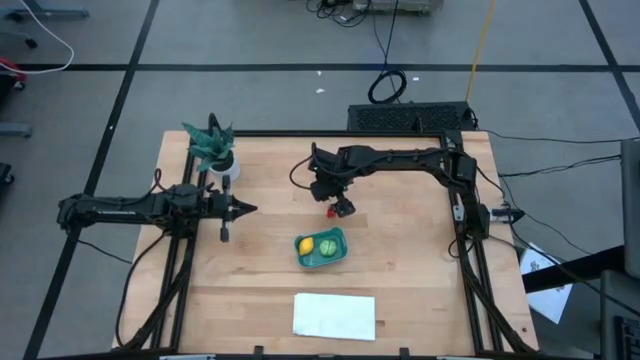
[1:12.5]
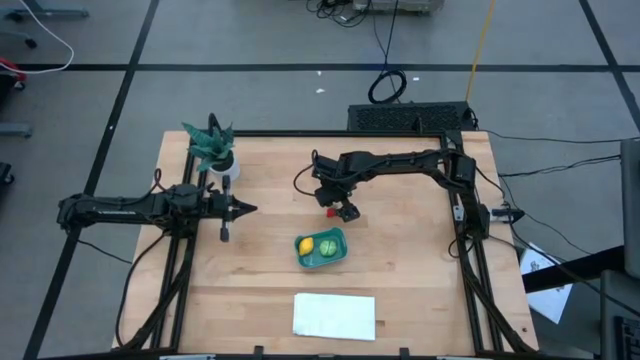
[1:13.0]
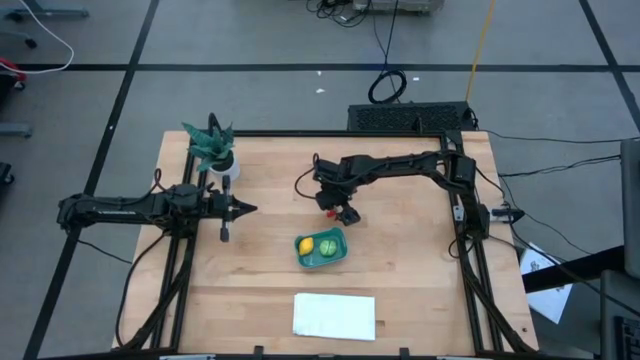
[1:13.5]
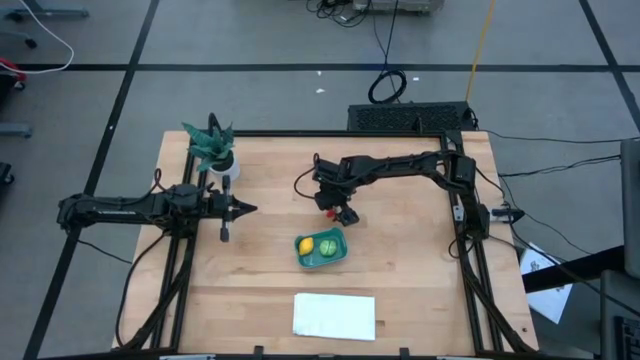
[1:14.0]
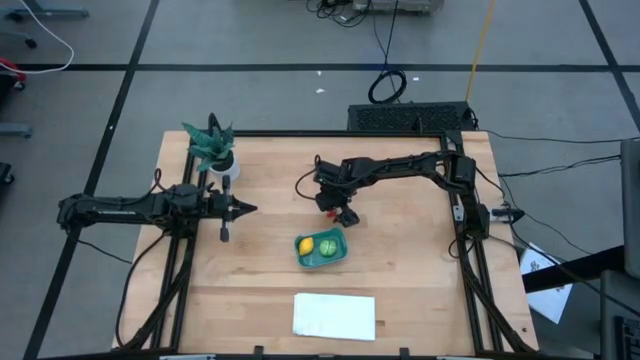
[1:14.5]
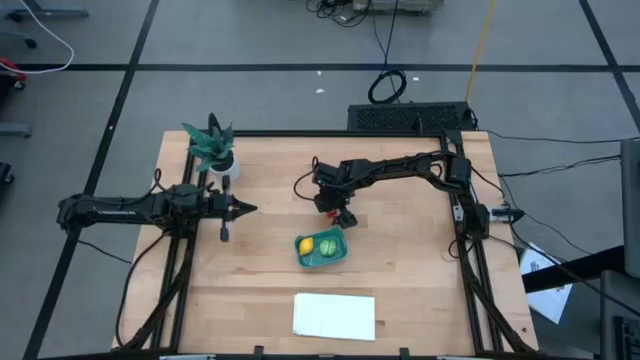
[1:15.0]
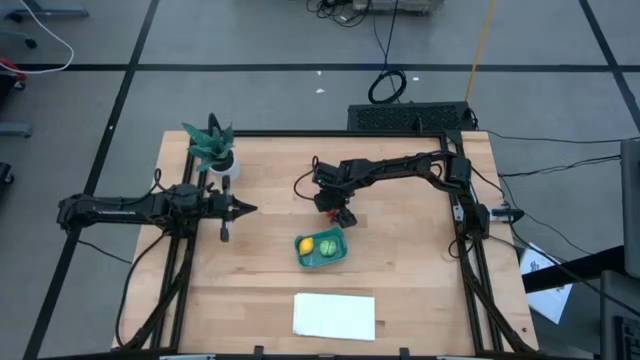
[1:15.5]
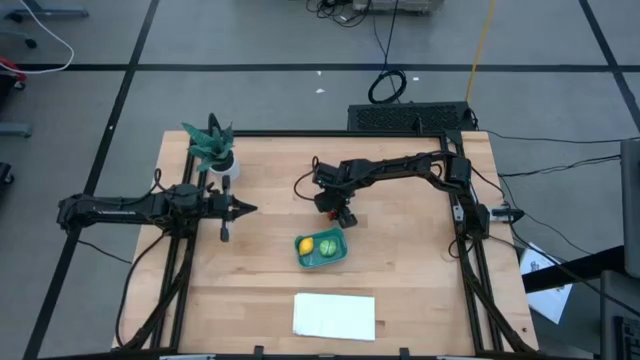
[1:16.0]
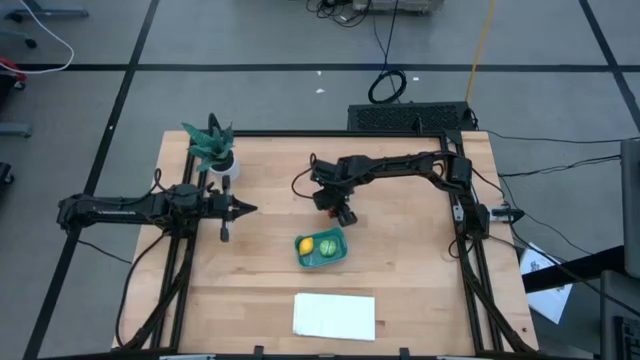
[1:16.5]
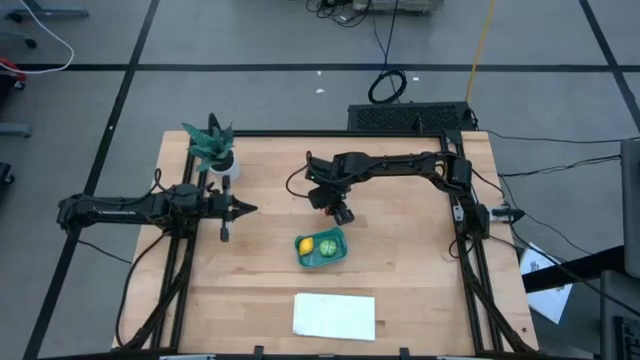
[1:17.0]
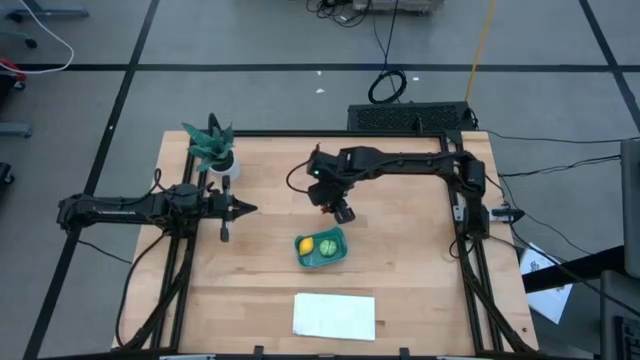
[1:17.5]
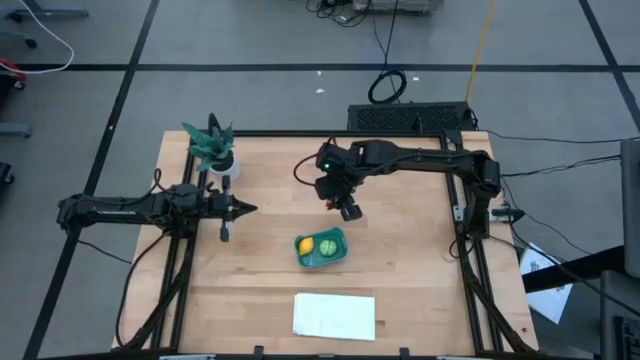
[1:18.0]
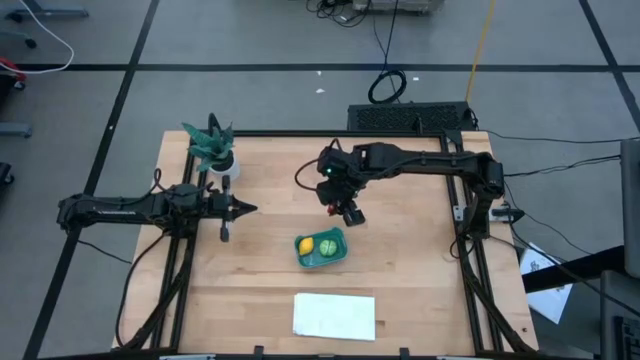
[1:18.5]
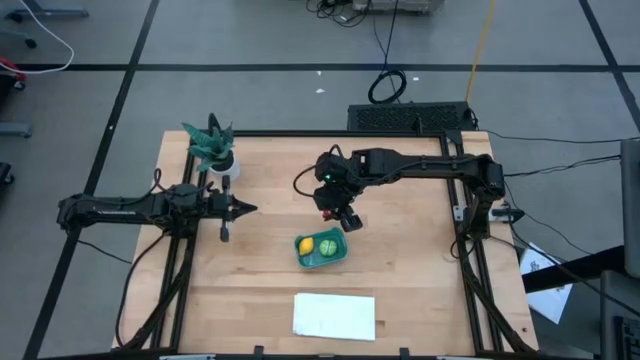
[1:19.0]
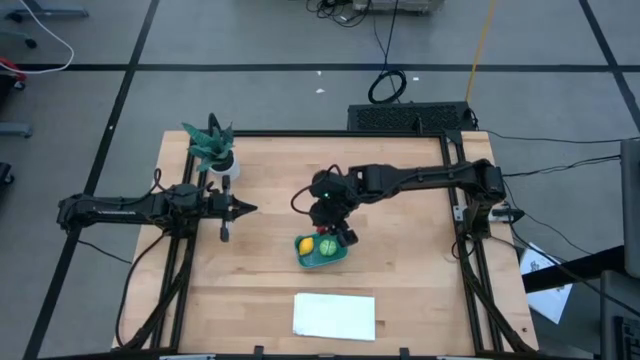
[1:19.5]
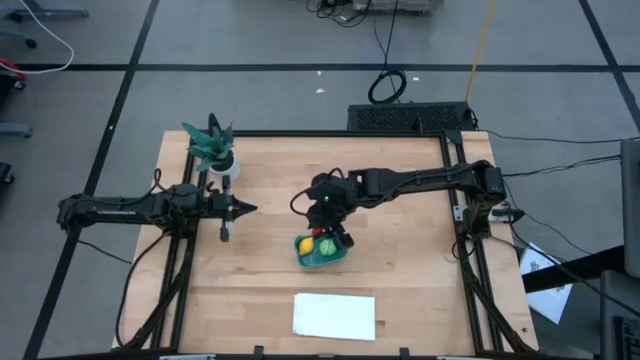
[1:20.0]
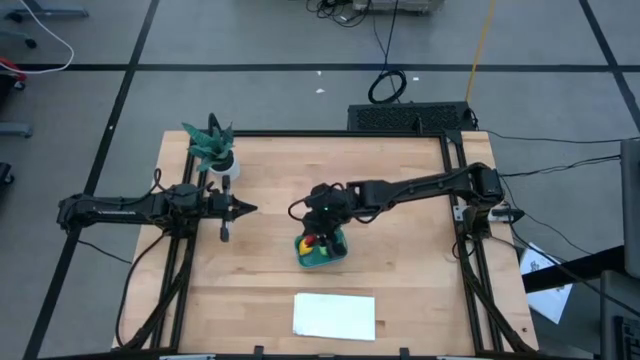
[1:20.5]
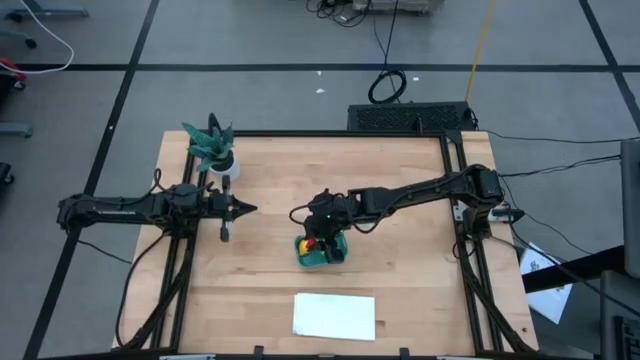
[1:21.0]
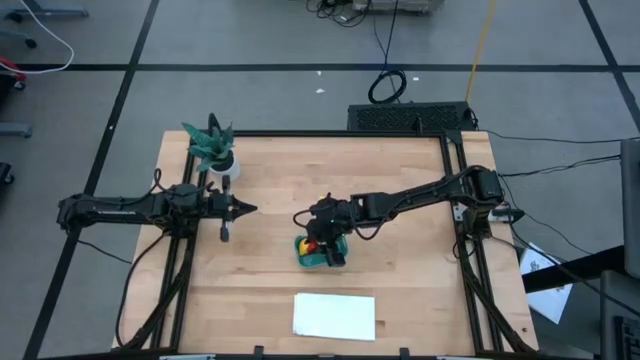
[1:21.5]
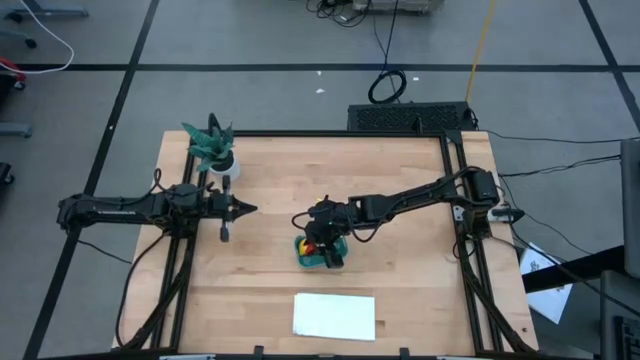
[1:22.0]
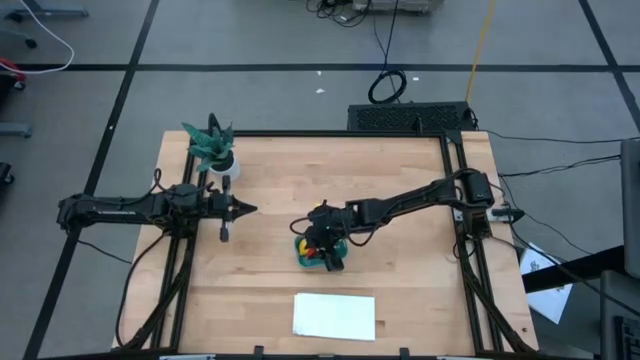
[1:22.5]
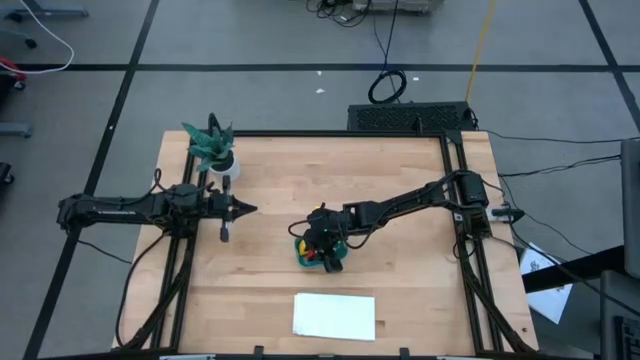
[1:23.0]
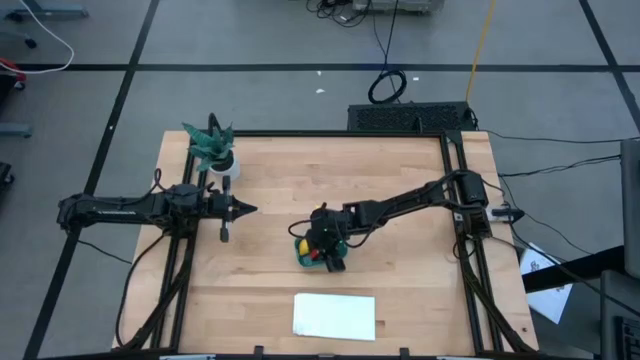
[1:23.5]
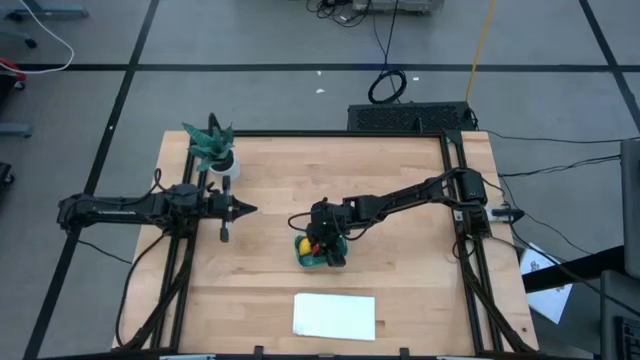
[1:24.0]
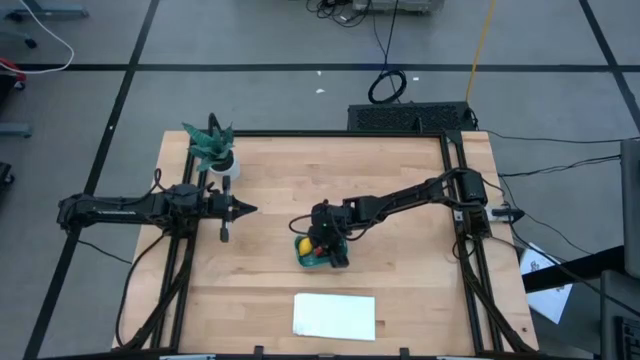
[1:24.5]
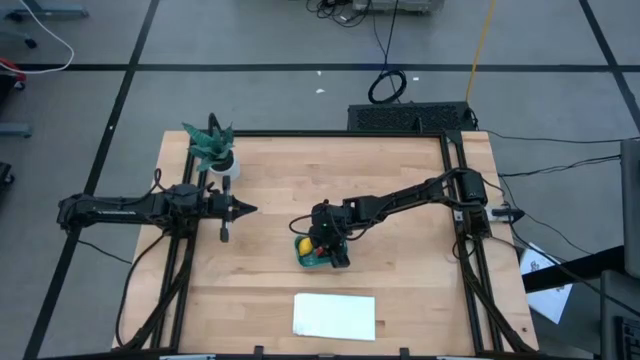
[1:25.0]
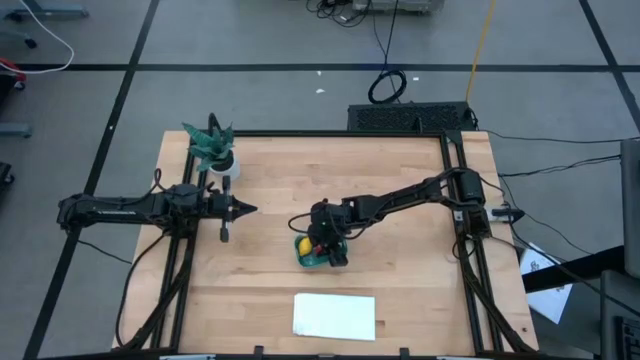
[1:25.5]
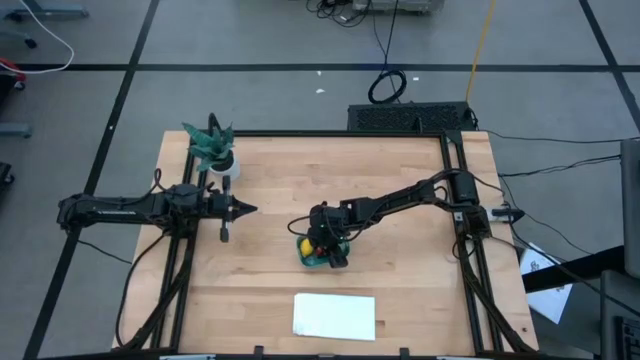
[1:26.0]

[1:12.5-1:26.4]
Task: Pick and placing Produce into tupperware
Put the red strawberry into the blue bin

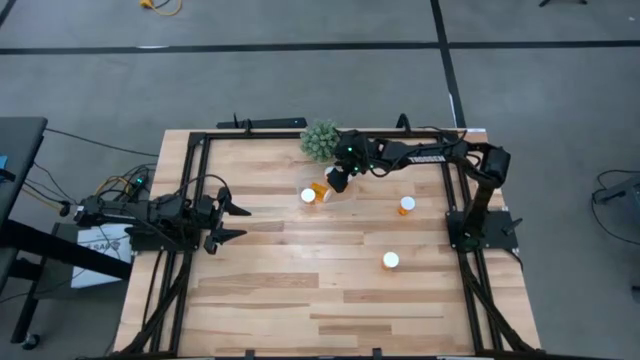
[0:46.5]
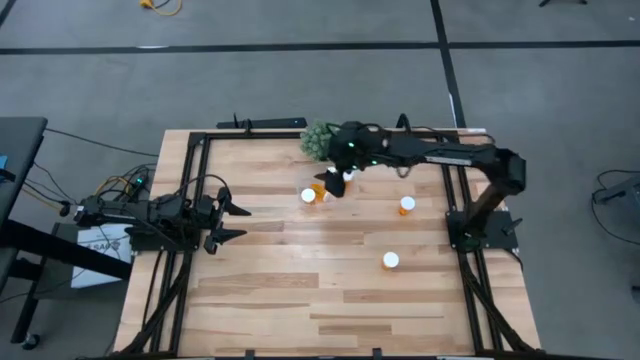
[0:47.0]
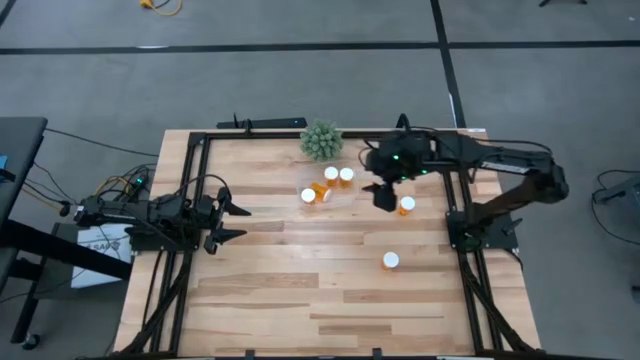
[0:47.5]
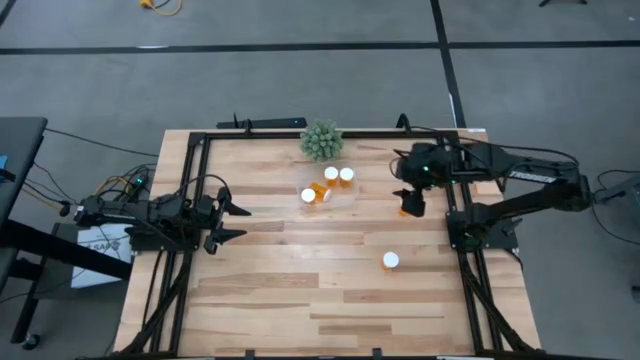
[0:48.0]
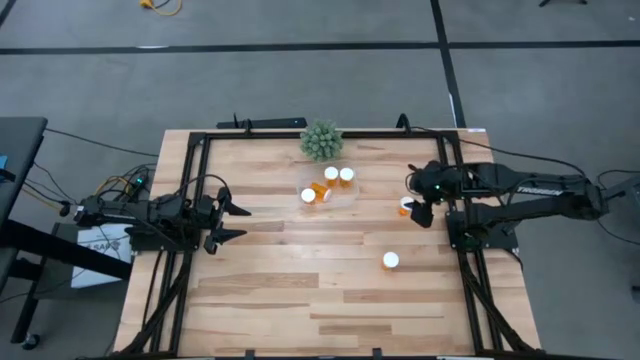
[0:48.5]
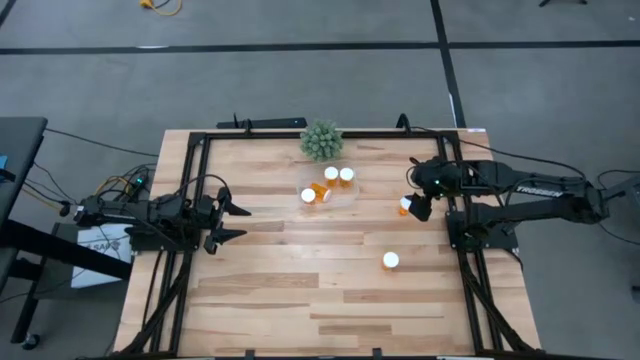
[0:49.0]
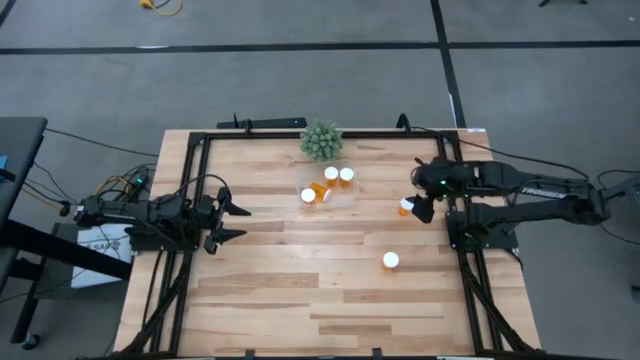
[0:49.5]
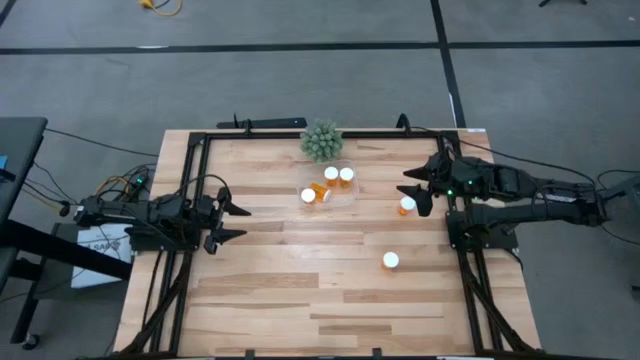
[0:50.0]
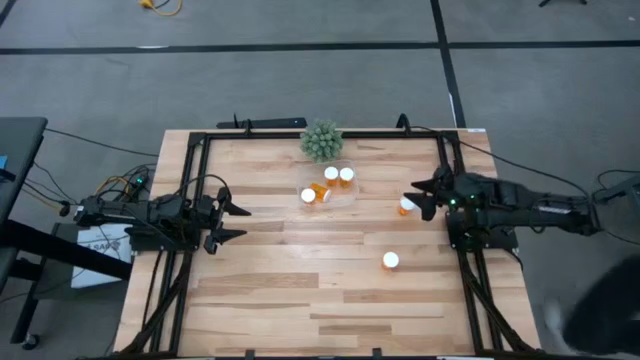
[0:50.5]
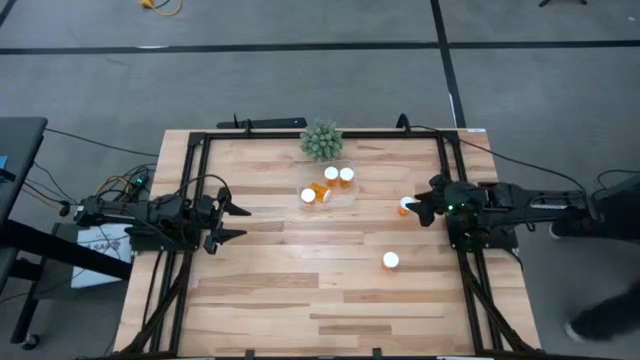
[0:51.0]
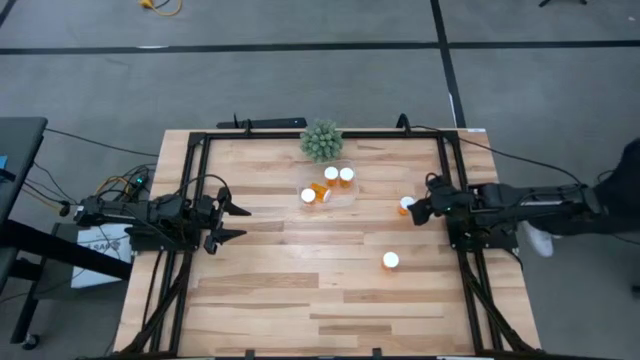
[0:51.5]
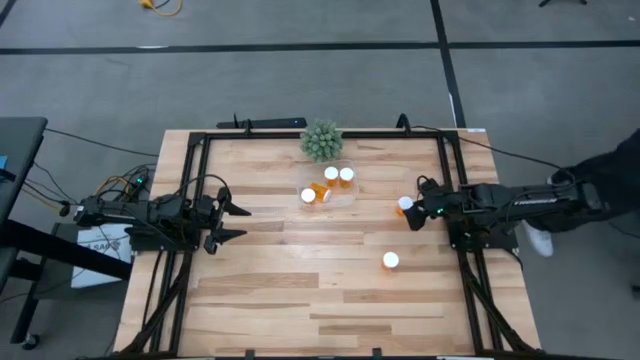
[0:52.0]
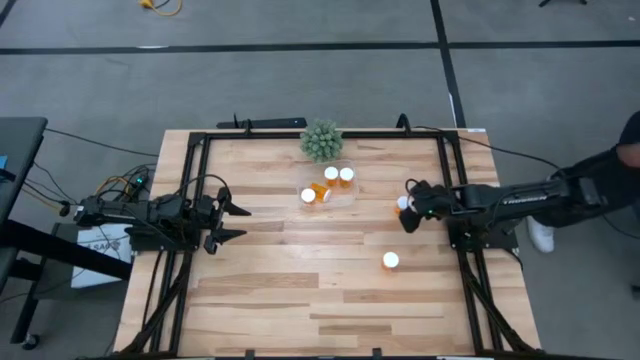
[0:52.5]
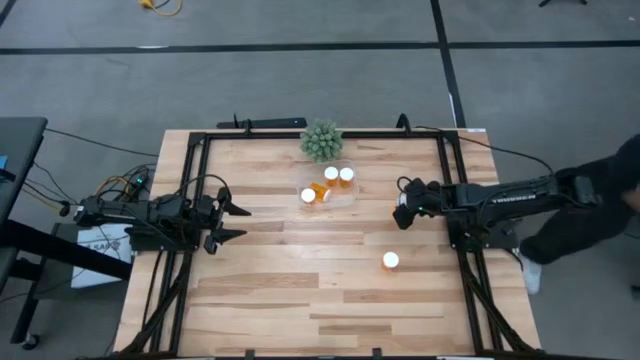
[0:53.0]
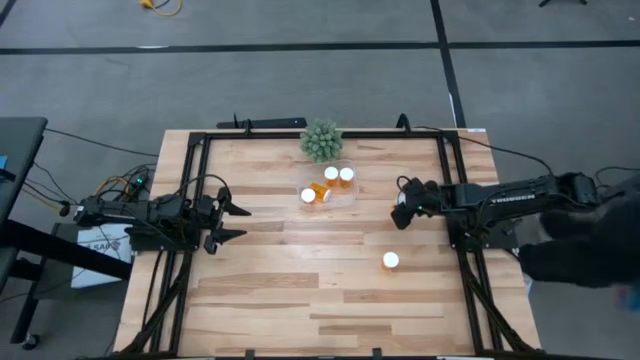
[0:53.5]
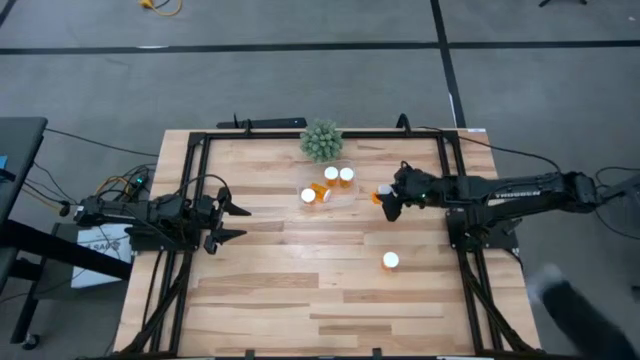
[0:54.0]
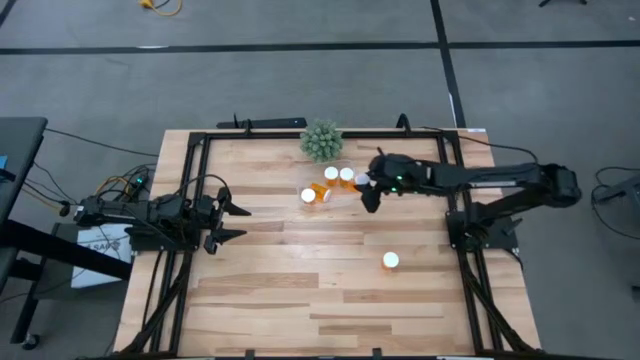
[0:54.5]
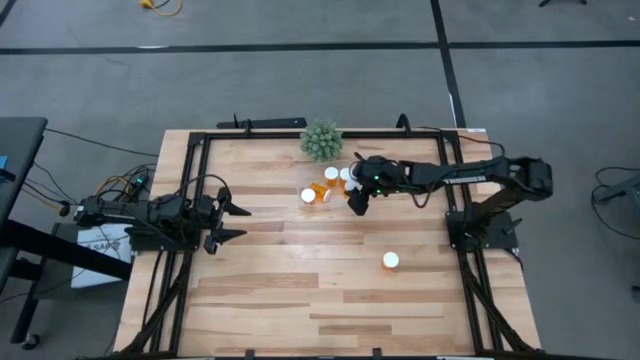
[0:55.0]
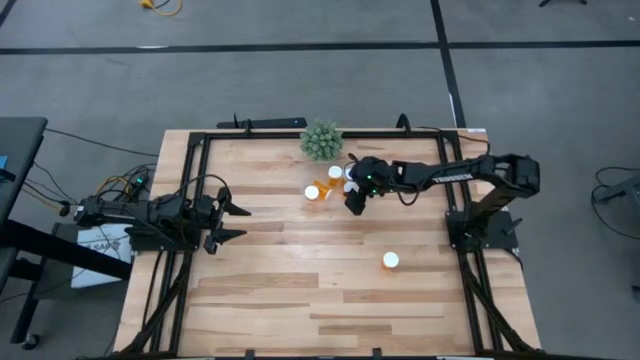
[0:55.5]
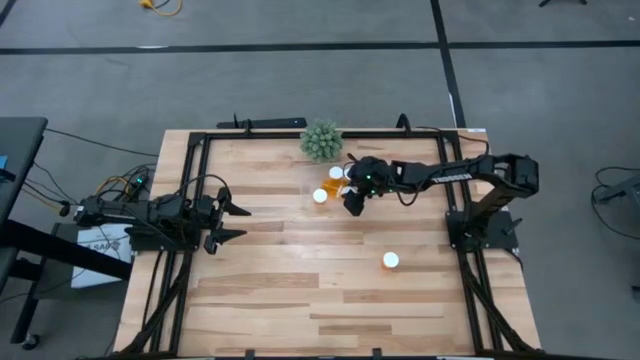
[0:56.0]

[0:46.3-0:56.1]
Task: Pick and place pill bottles into a basket
Put the orange pill bottle into the transparent bin
